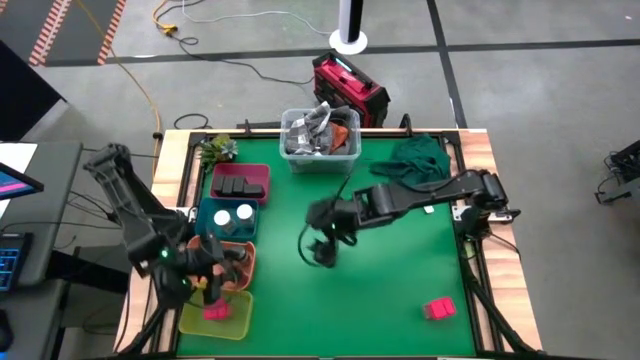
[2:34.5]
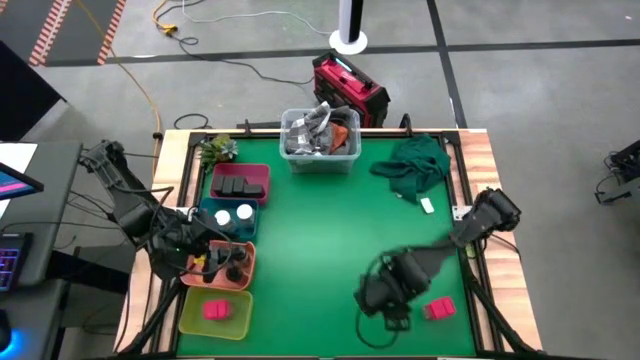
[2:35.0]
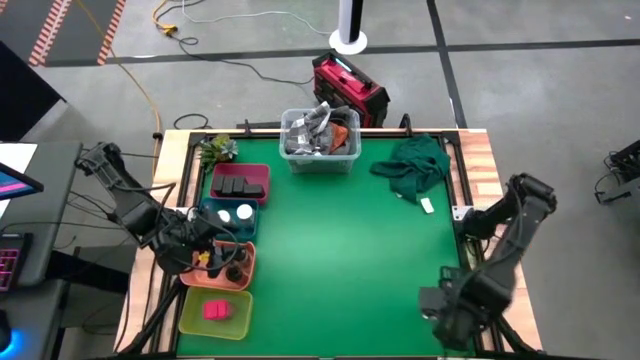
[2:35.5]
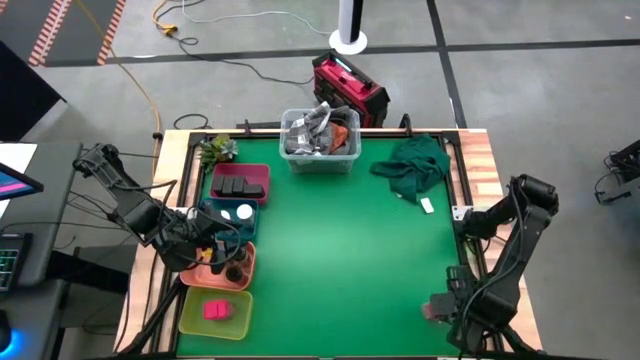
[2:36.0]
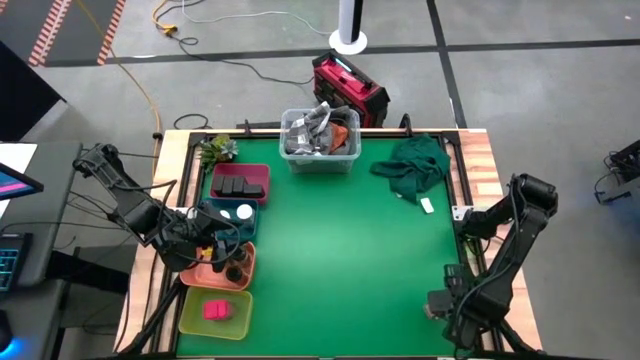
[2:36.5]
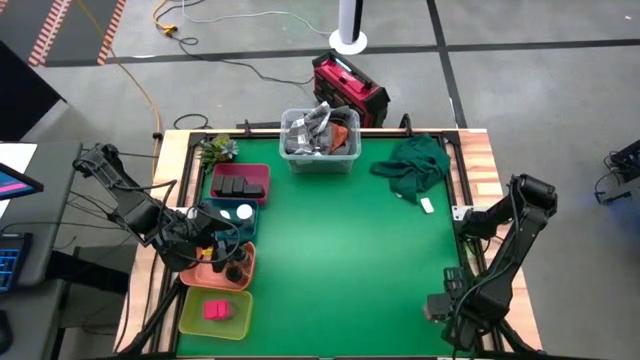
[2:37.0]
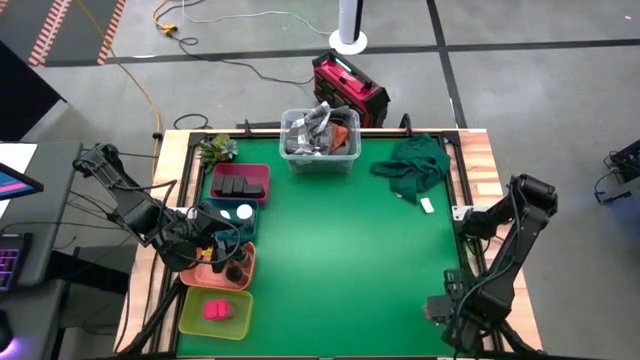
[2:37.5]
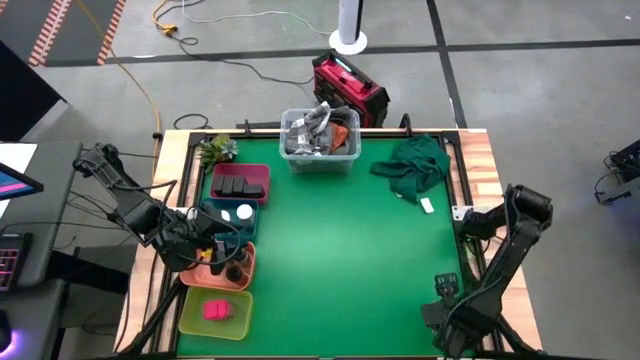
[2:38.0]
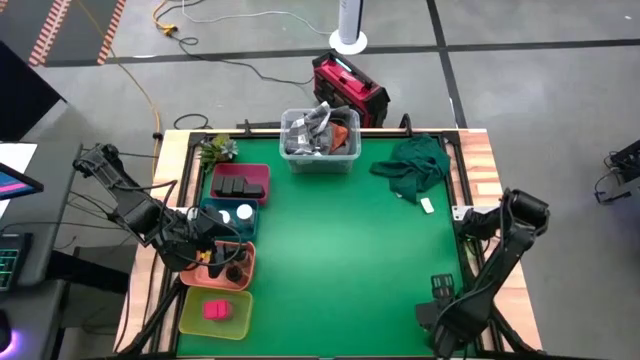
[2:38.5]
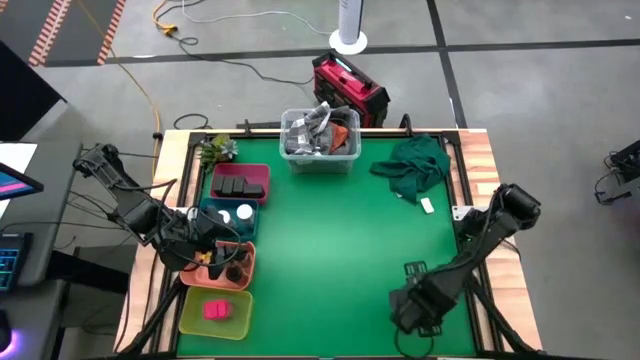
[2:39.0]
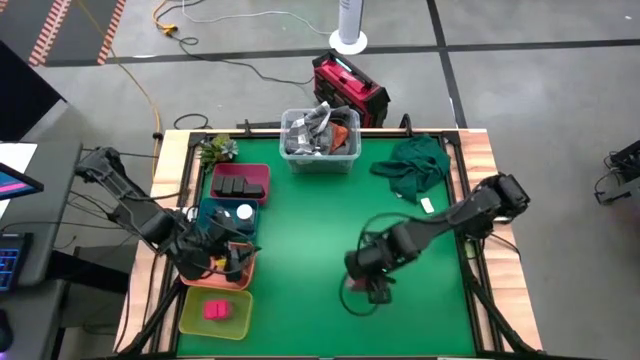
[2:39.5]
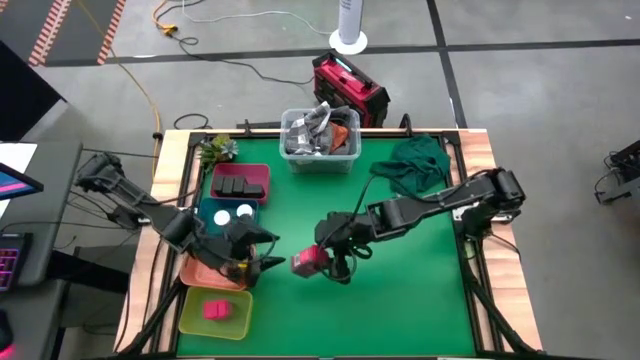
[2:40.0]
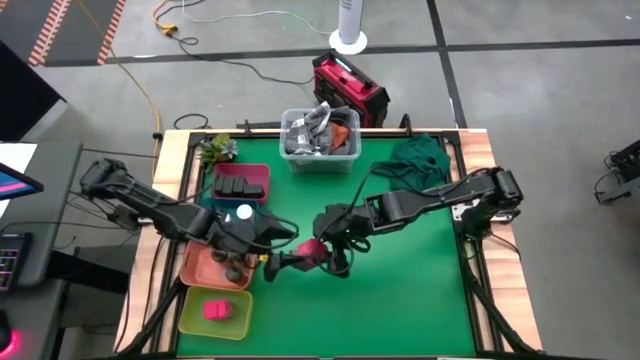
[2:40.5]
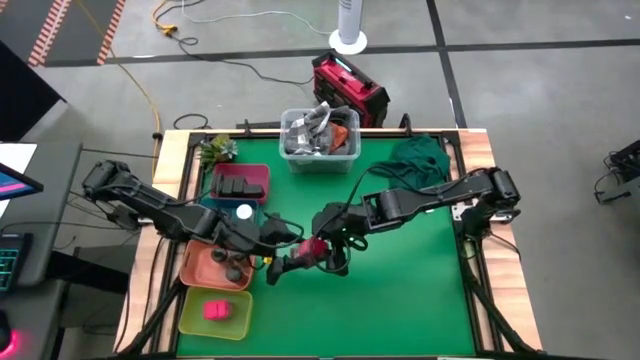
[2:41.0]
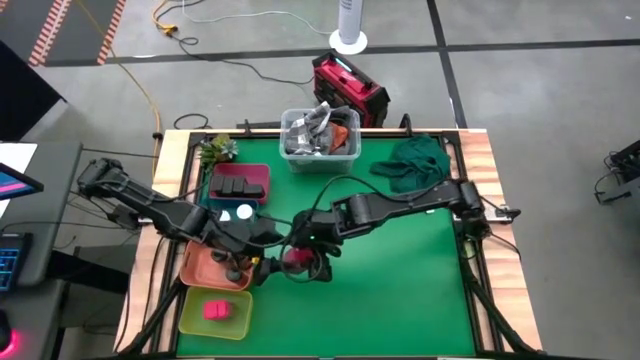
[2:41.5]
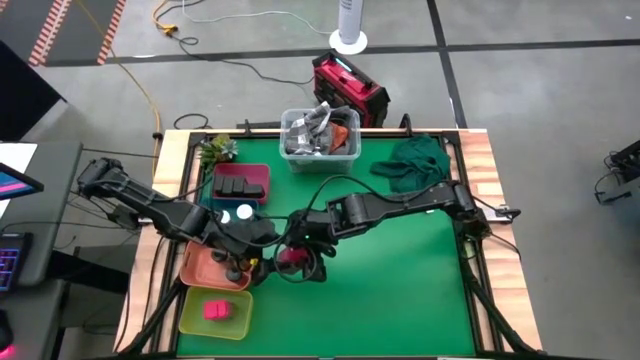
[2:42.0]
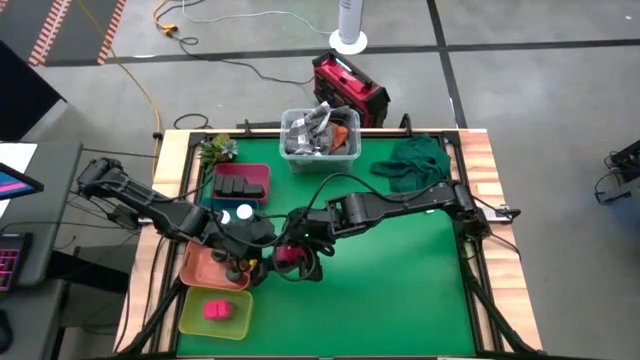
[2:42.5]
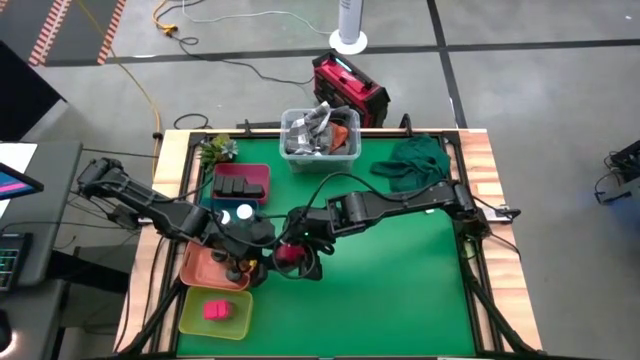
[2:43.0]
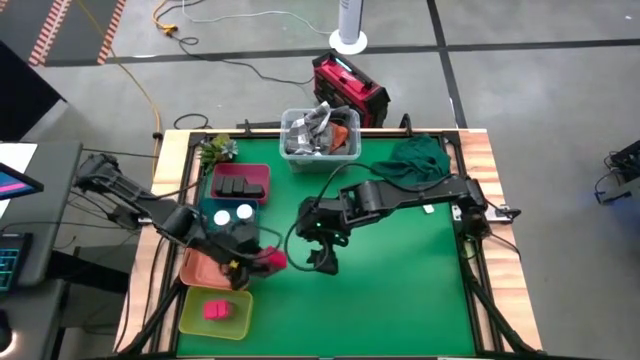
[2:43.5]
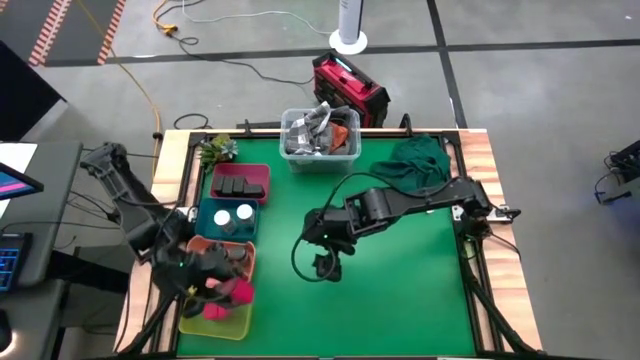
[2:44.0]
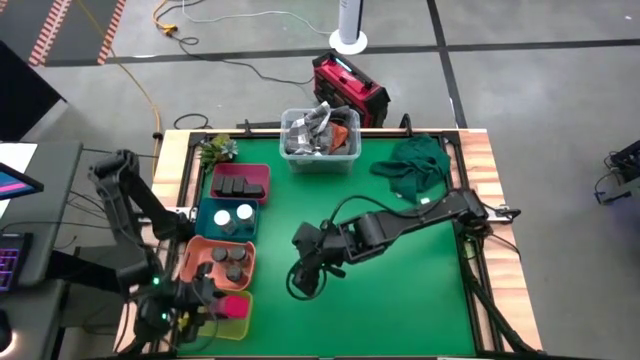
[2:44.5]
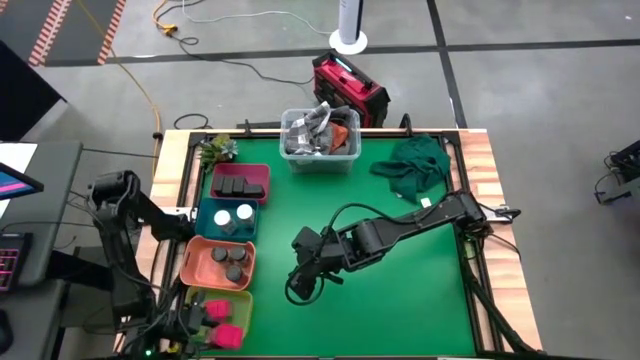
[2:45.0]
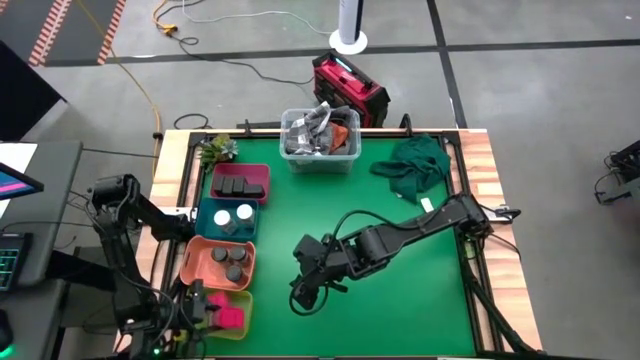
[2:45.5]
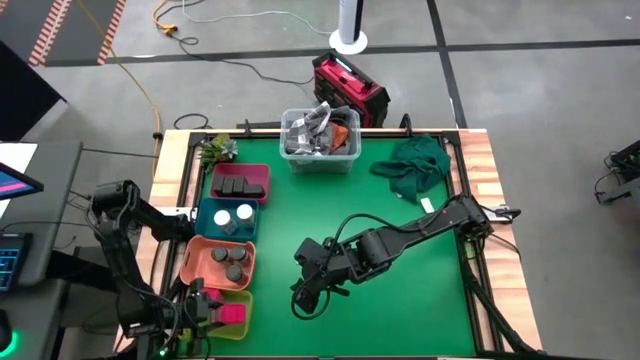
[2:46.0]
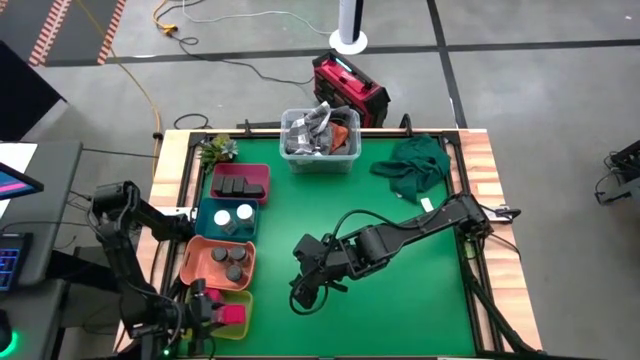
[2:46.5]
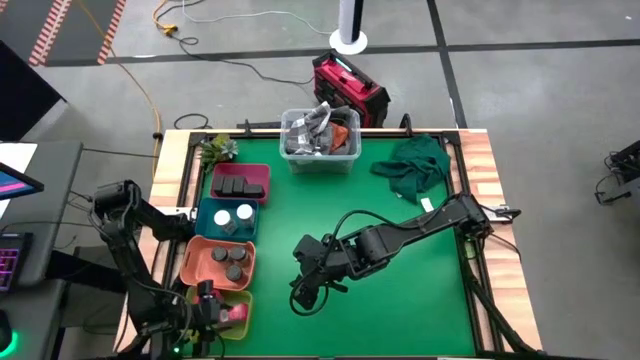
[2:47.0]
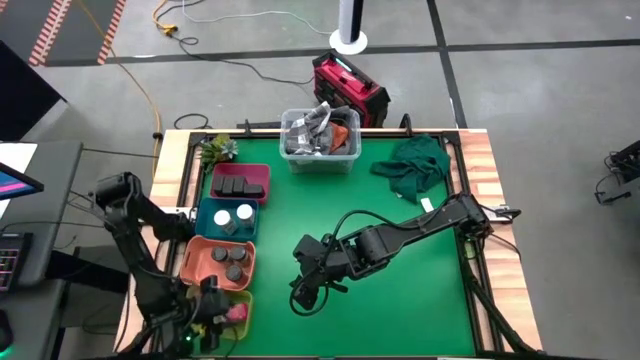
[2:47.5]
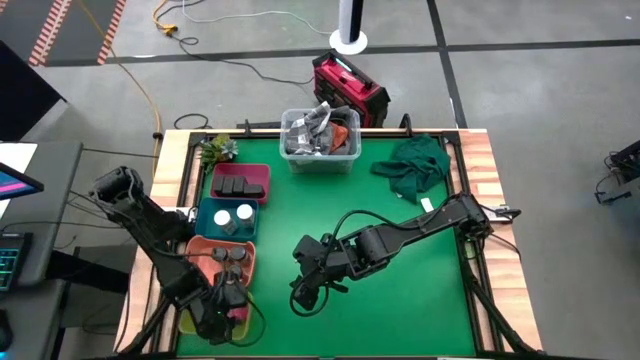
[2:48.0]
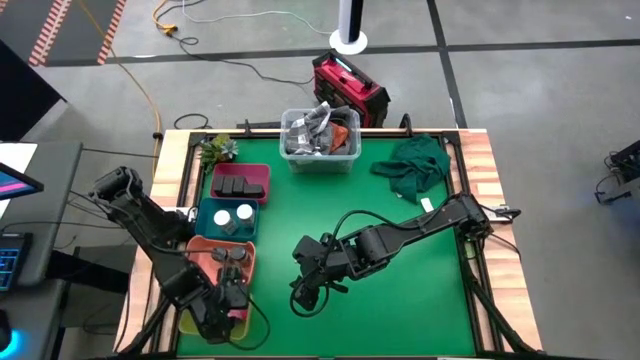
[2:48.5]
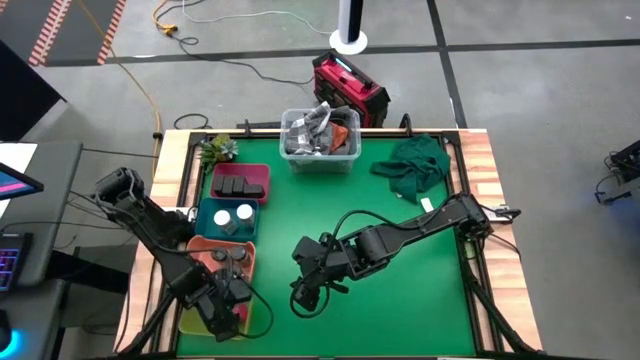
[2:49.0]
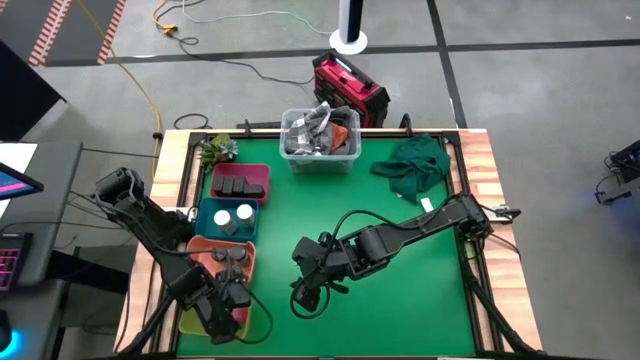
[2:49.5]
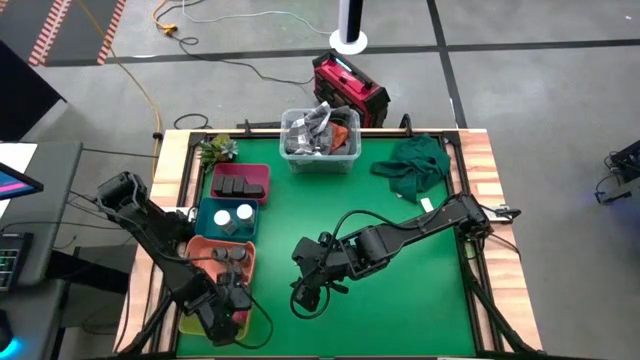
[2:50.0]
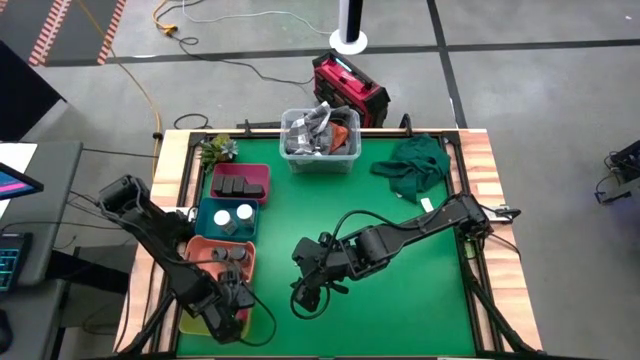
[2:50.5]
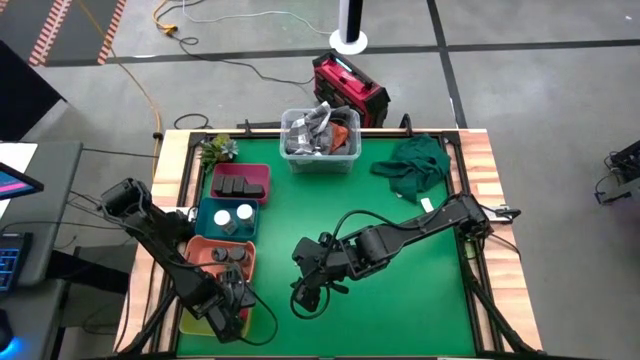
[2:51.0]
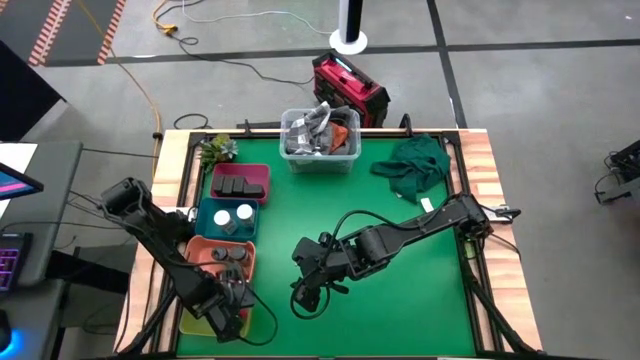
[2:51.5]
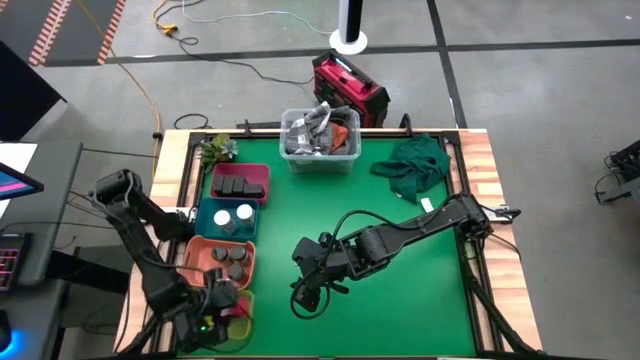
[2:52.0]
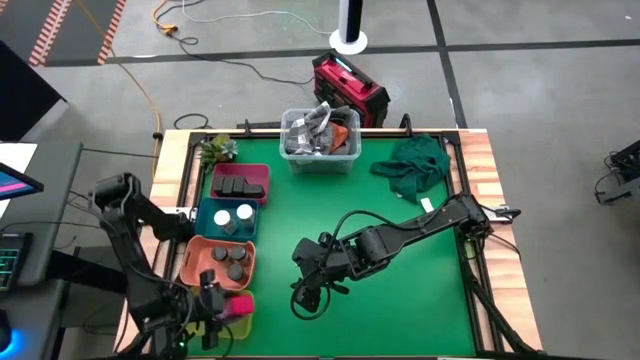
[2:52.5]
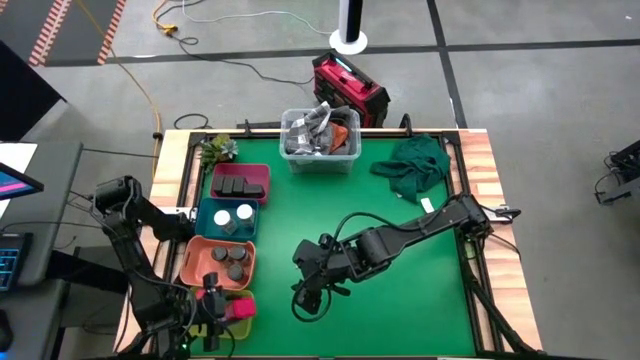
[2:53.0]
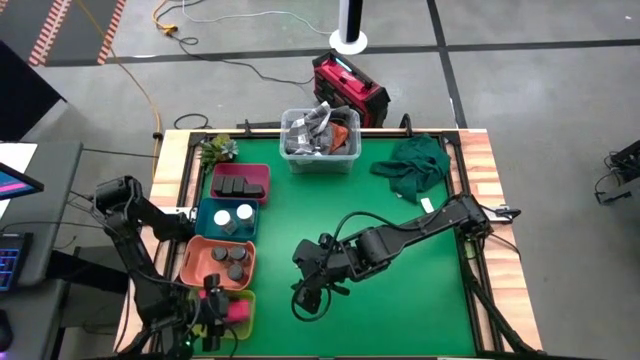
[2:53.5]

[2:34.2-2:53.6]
Task: Sort spices by type
Put the red seasoning can into the yellow bin

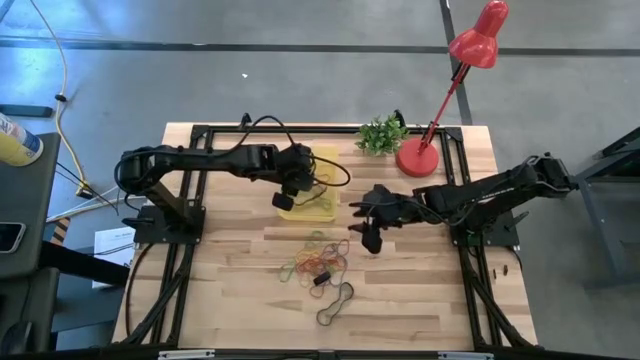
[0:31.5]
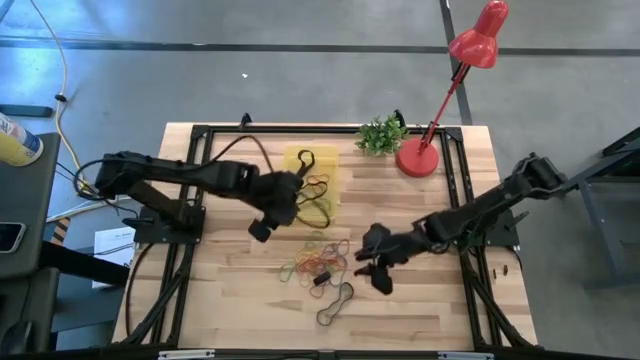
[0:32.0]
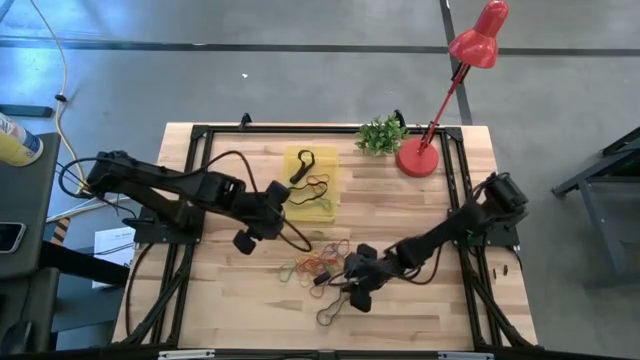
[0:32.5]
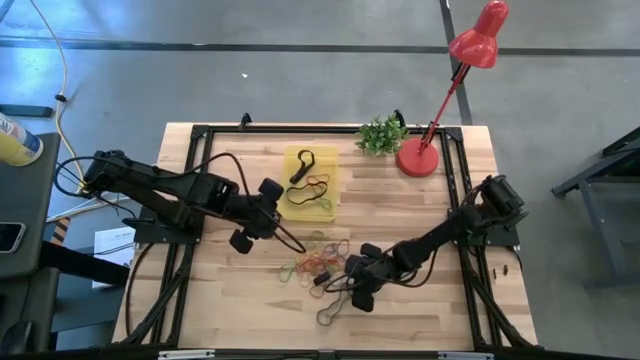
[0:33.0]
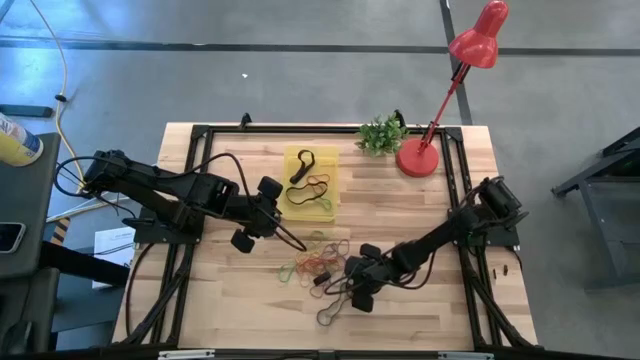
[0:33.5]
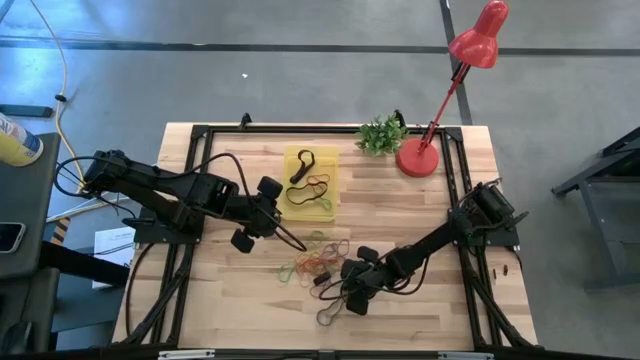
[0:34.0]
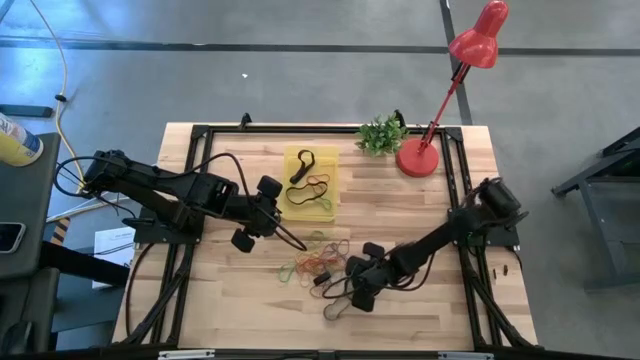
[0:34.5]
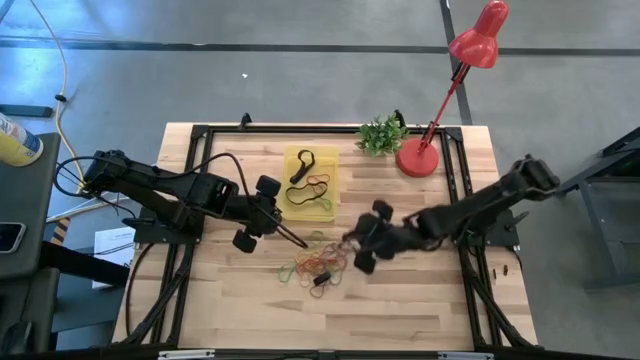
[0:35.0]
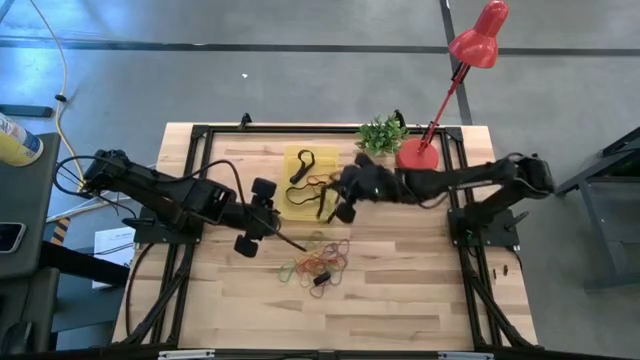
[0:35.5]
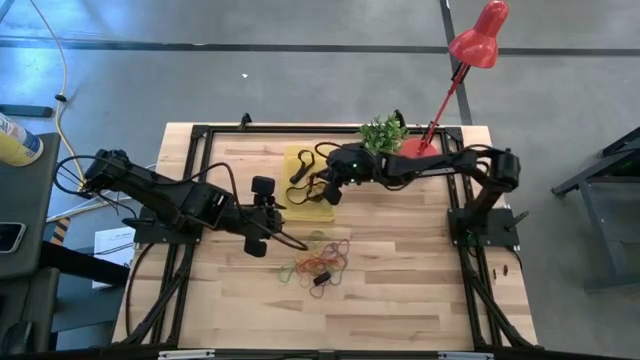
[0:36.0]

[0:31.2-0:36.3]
Task: Pick and place rubber bands into bin
Put the black rubber band into the yellow bin
